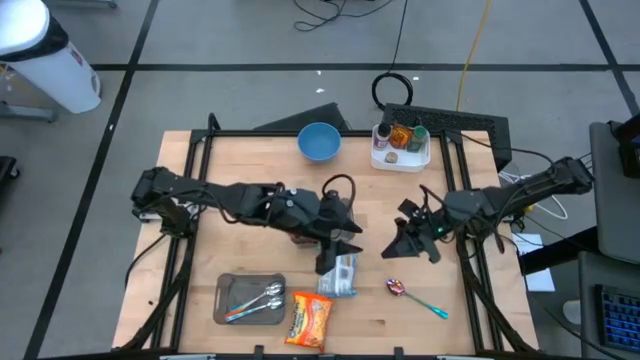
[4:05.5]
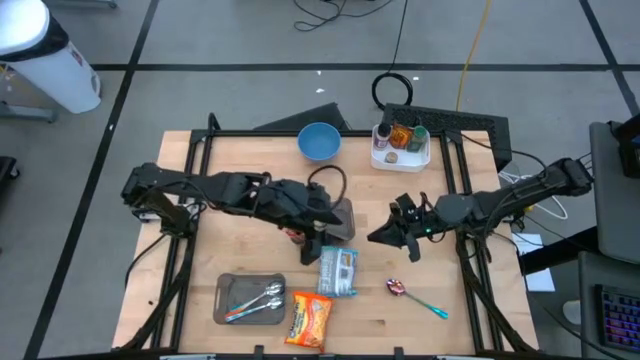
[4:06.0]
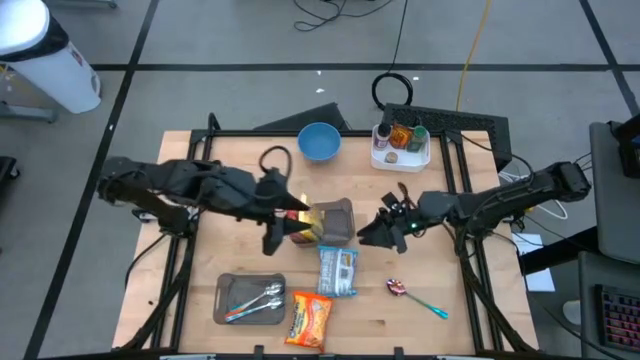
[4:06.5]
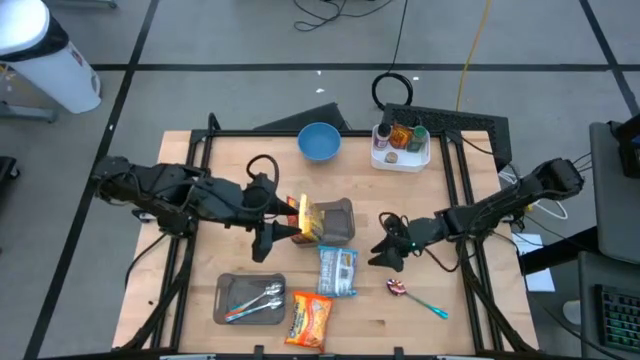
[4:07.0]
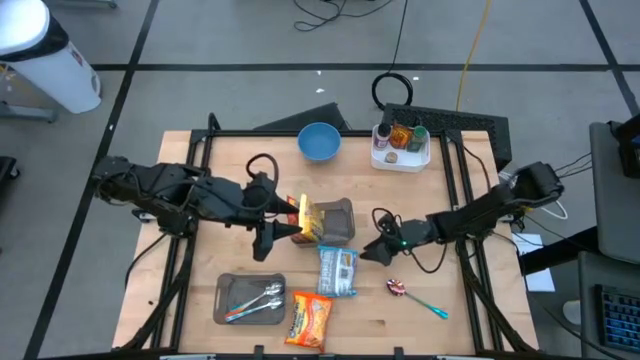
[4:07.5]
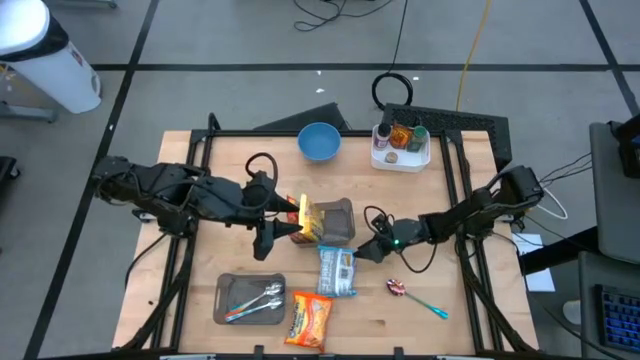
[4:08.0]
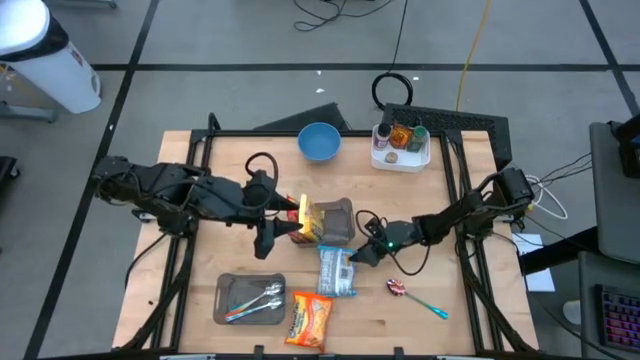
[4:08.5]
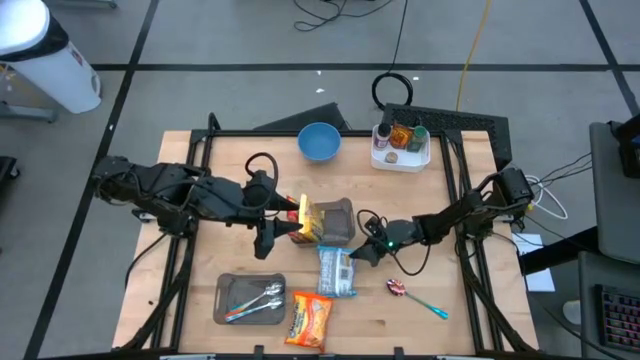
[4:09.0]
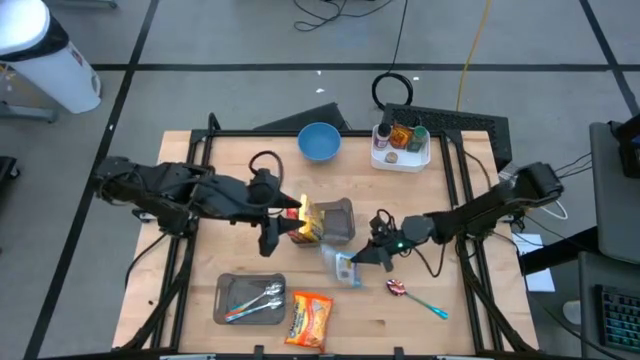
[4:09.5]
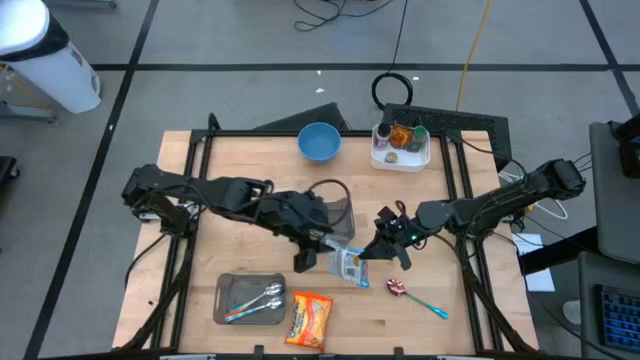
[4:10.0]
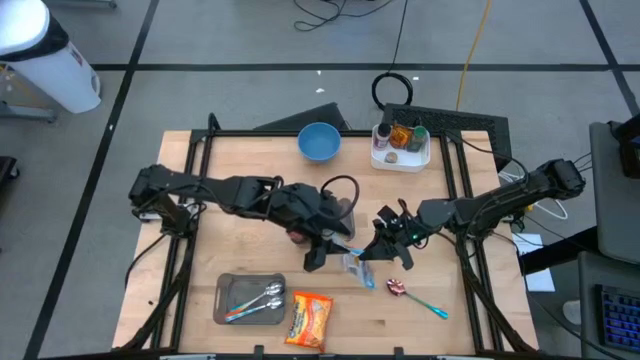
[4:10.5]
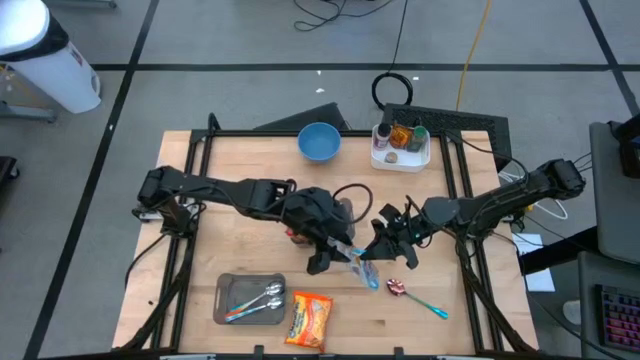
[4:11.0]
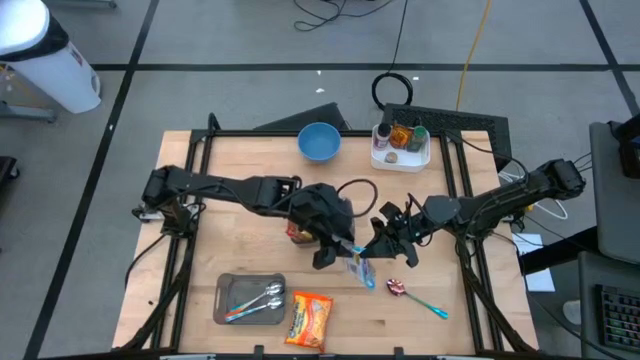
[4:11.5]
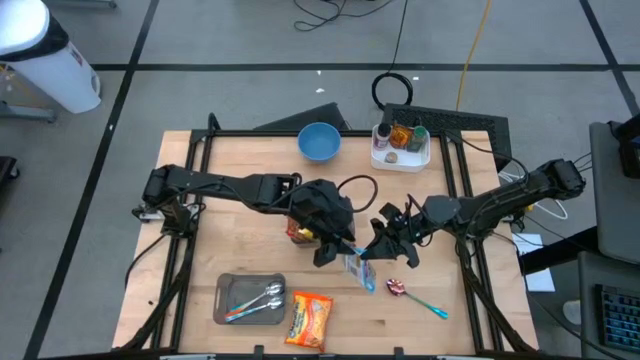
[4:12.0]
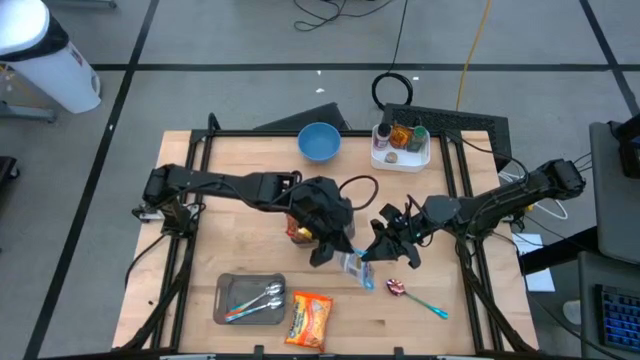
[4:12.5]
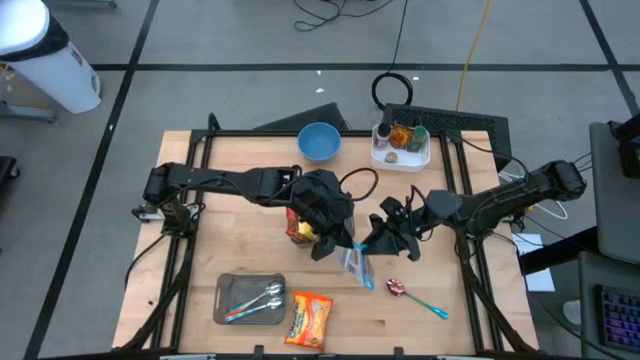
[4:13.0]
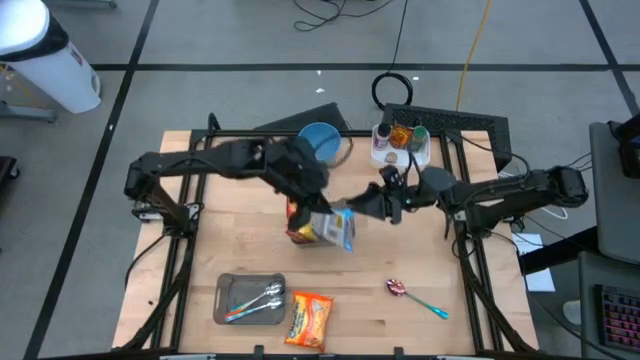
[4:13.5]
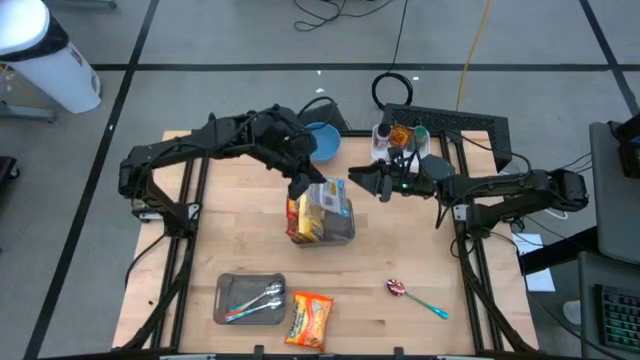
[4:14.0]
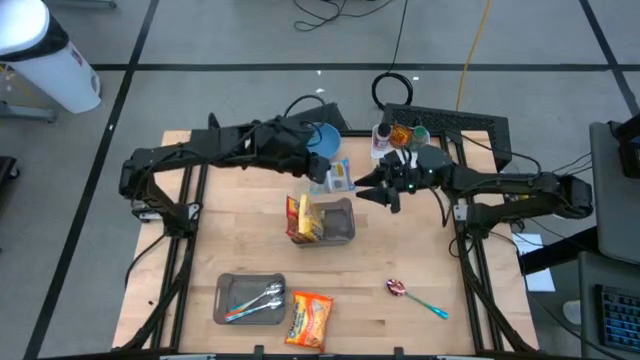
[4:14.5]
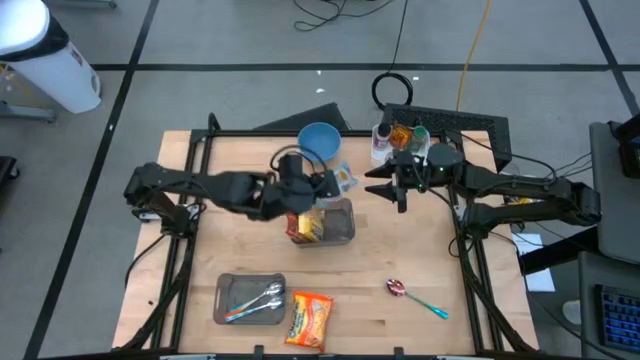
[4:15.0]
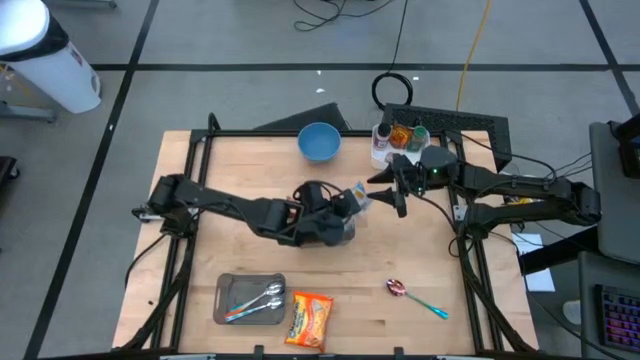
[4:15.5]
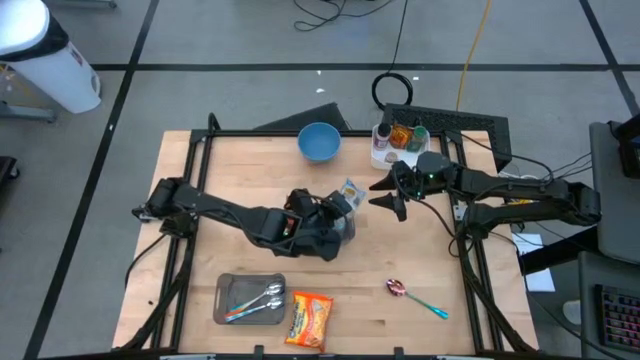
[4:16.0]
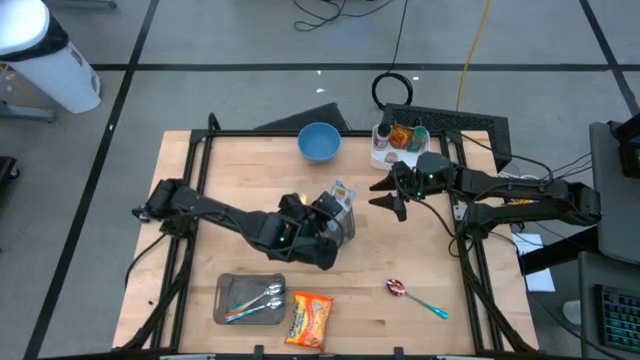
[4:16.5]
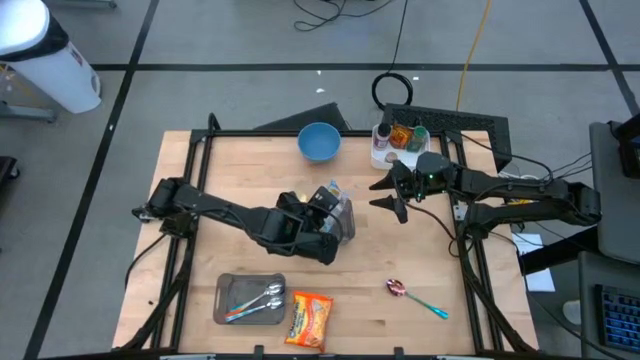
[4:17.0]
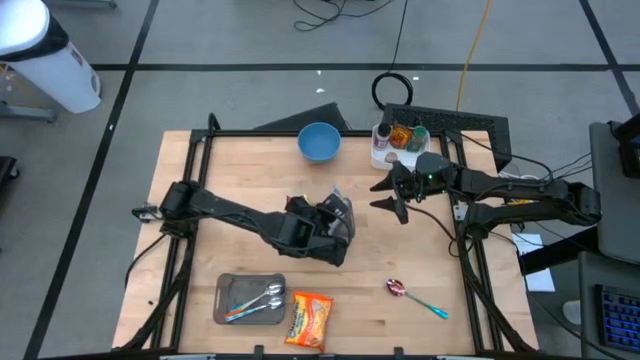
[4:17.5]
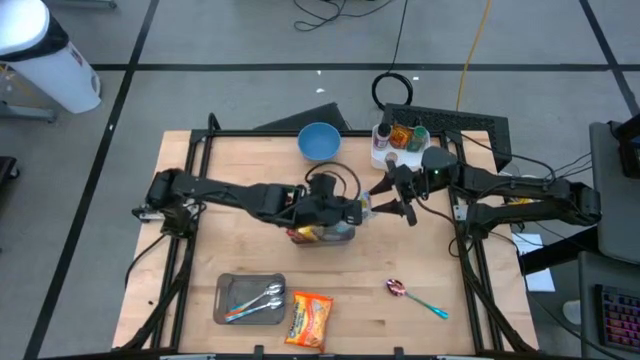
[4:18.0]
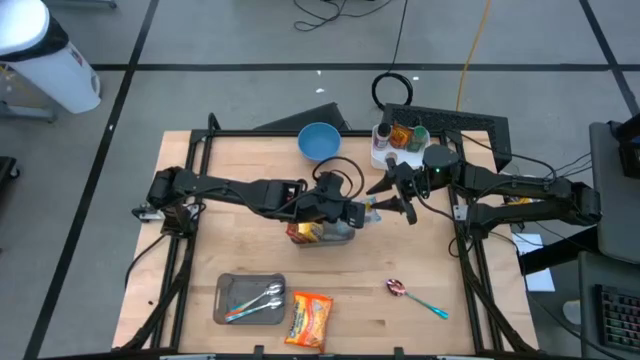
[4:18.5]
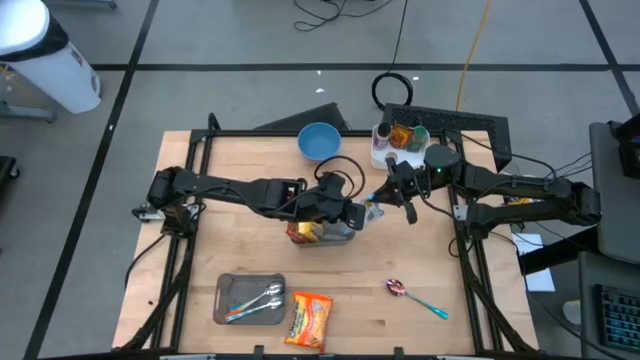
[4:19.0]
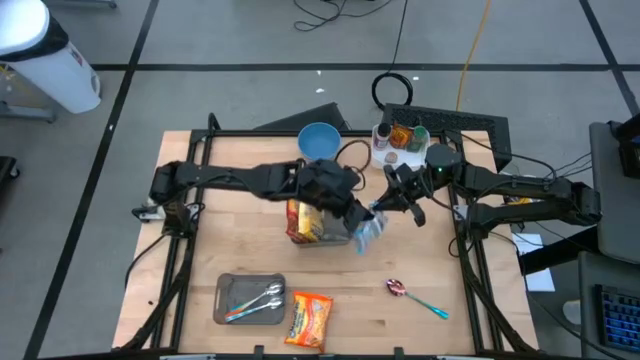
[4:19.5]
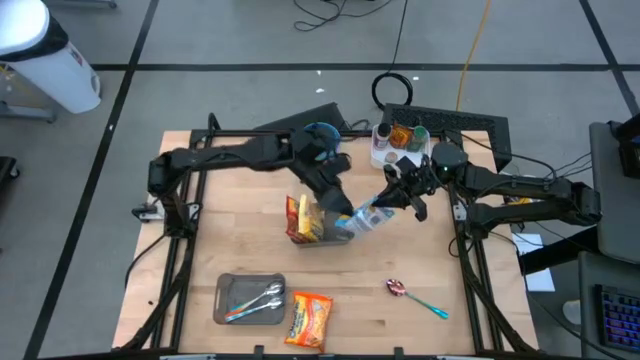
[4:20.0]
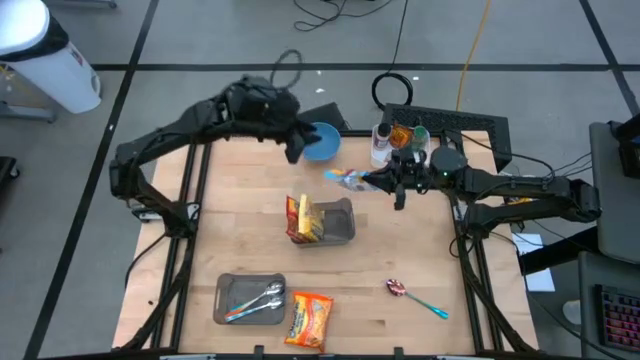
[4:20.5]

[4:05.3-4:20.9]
Task: Pick & Place Food Item
Put the blue noodle pack into the top black bin

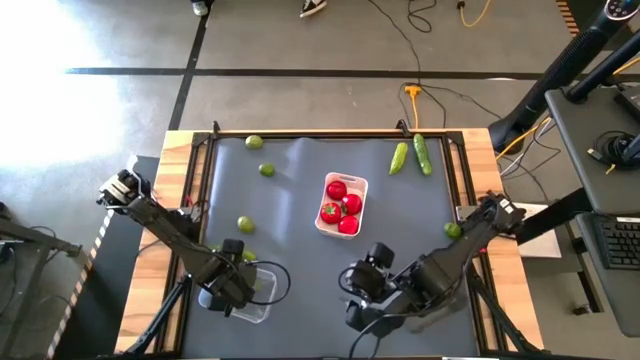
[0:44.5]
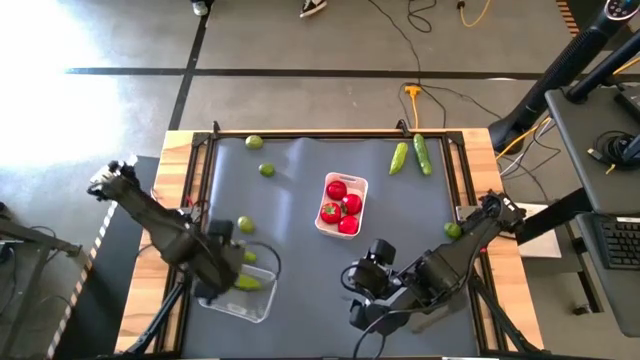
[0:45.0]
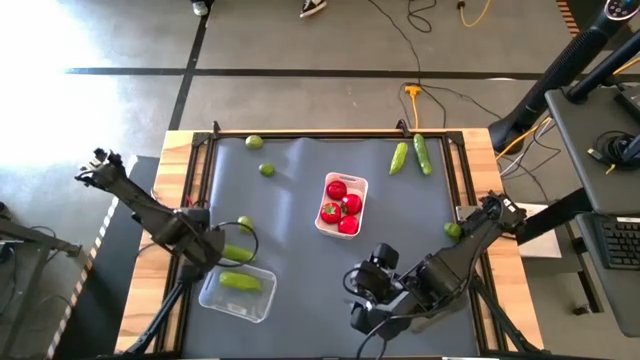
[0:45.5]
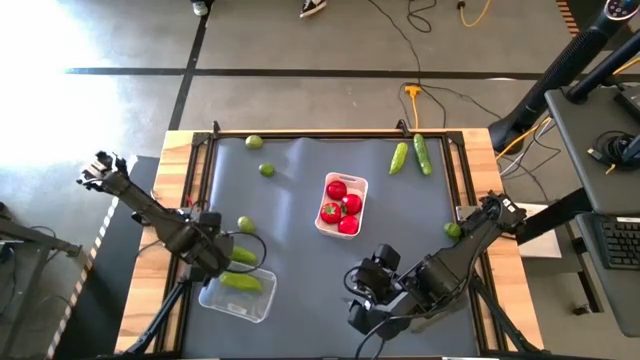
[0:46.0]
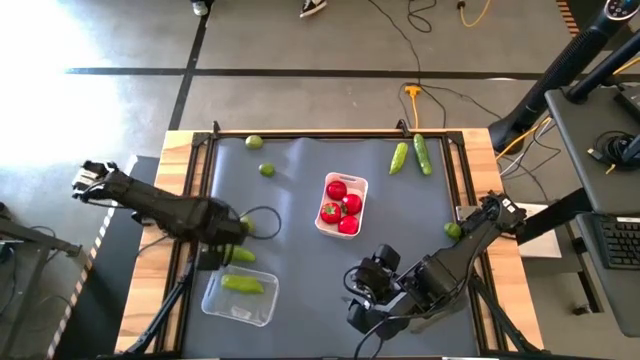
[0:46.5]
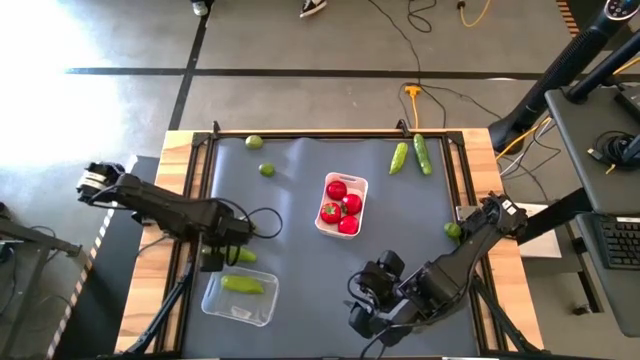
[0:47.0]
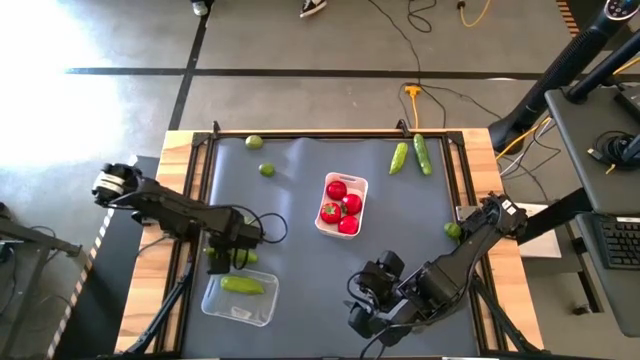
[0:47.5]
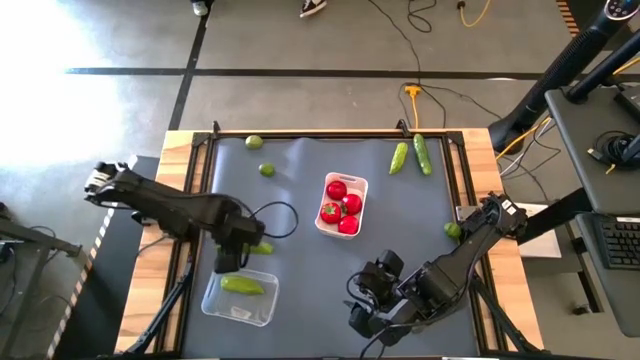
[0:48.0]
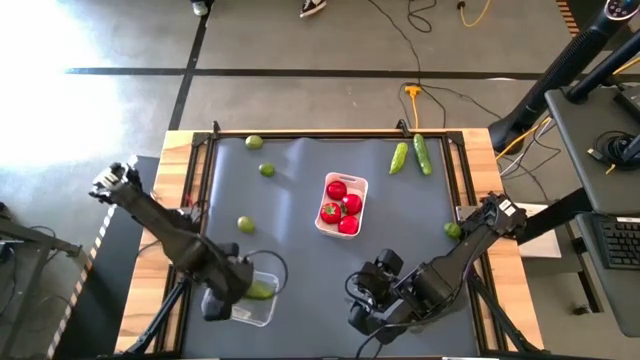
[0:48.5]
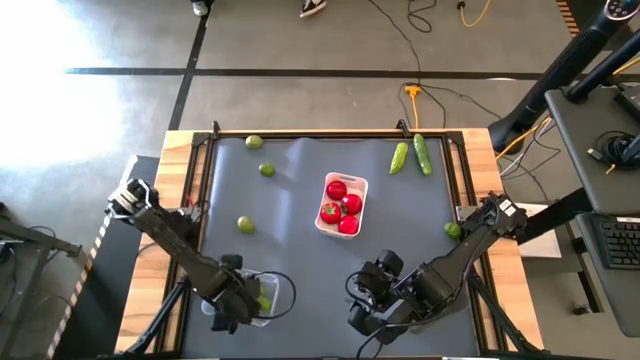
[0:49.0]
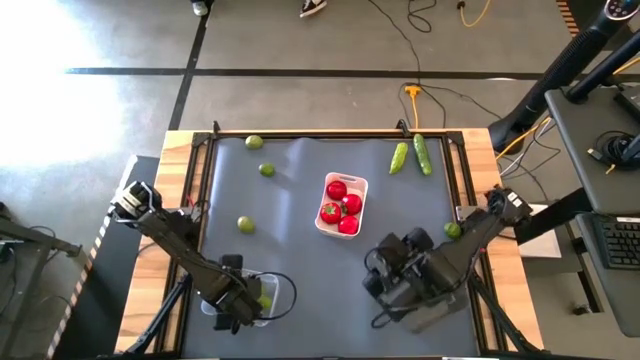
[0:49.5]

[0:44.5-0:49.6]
Task: Sort produce into baskets
Put the bottom cucumber into the transparent bin
